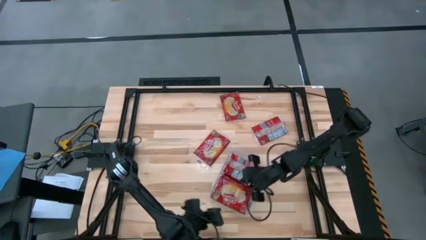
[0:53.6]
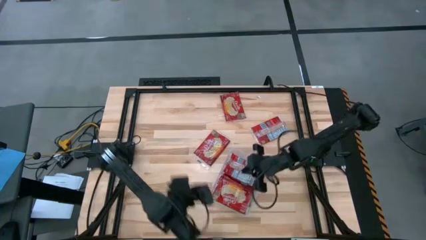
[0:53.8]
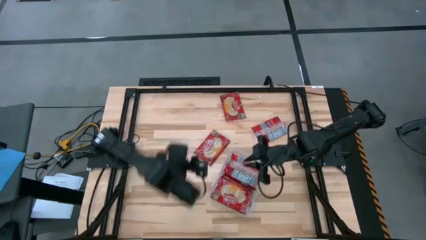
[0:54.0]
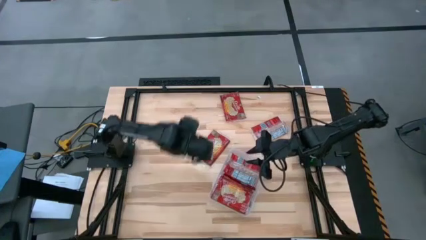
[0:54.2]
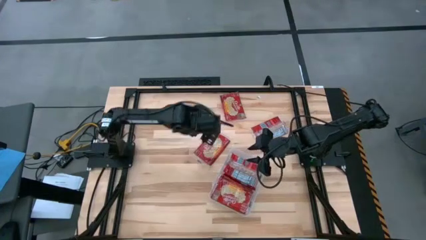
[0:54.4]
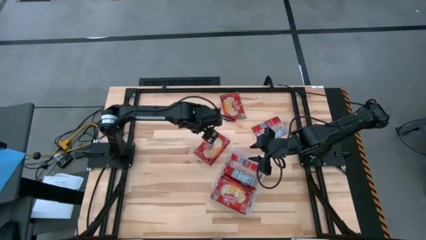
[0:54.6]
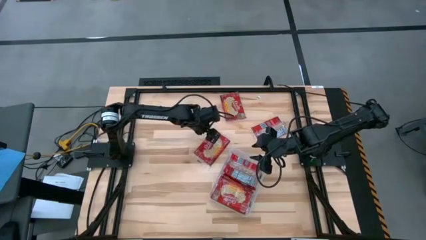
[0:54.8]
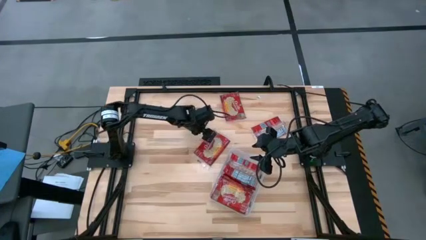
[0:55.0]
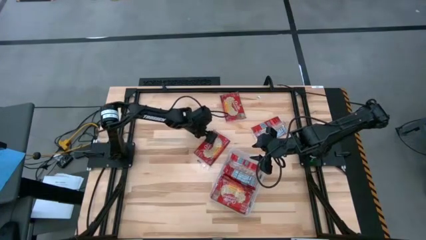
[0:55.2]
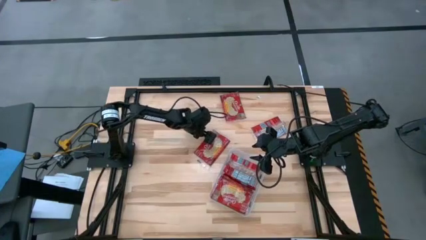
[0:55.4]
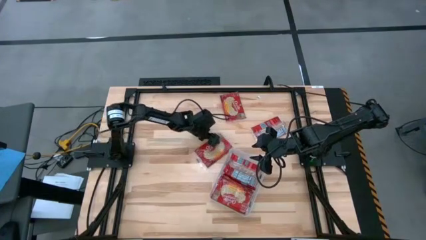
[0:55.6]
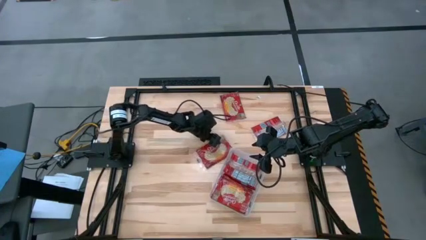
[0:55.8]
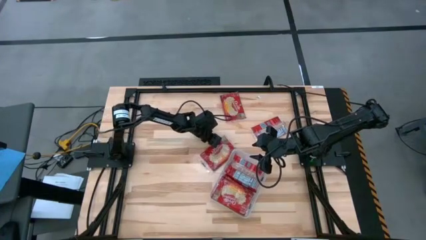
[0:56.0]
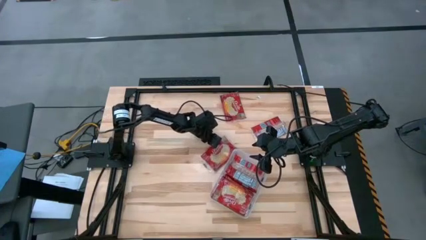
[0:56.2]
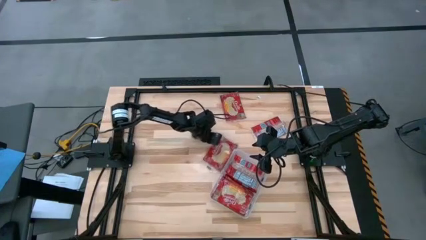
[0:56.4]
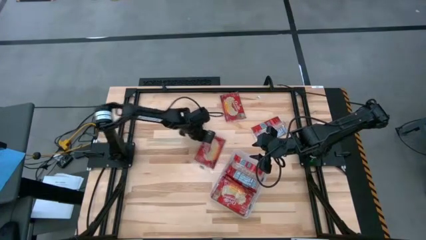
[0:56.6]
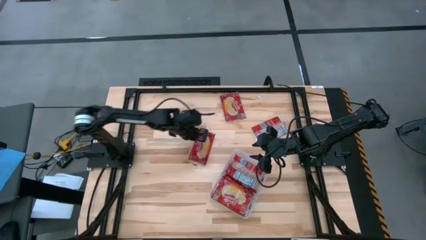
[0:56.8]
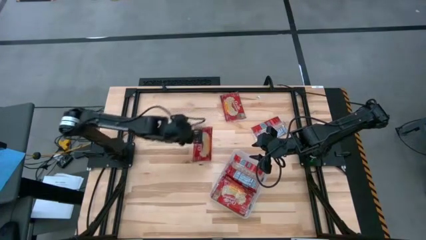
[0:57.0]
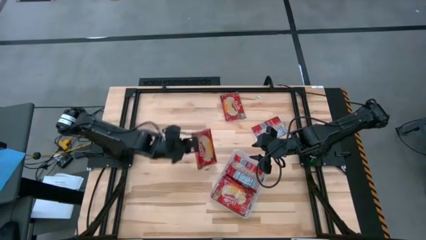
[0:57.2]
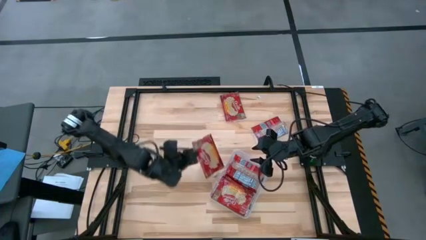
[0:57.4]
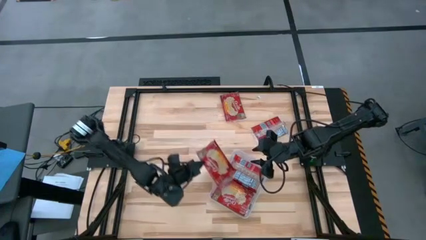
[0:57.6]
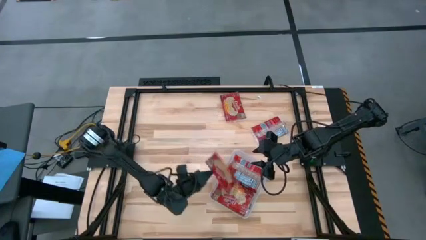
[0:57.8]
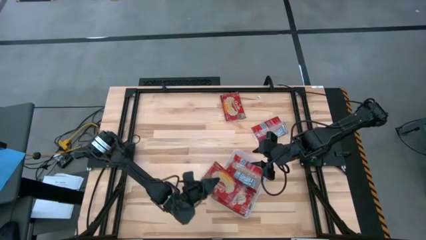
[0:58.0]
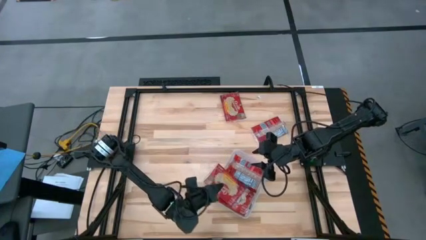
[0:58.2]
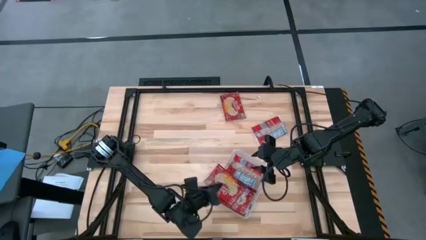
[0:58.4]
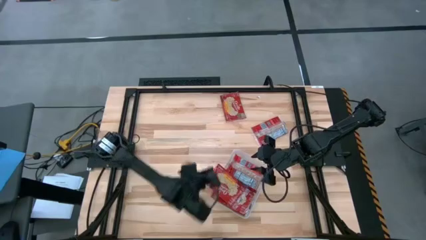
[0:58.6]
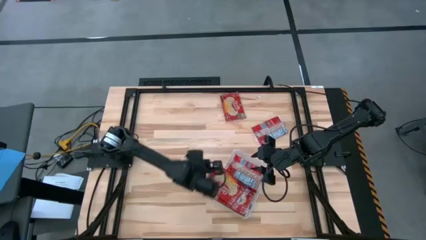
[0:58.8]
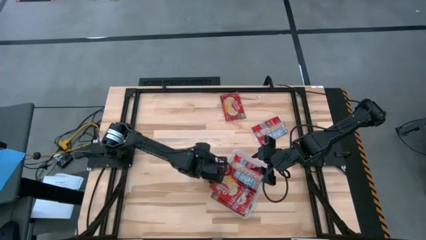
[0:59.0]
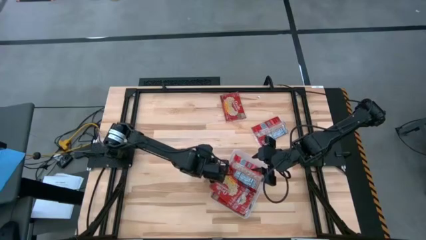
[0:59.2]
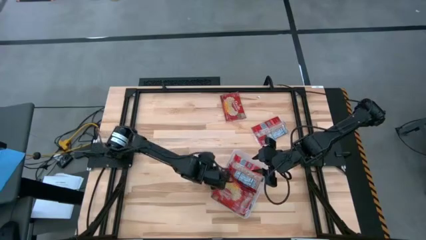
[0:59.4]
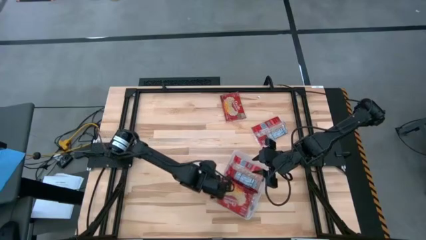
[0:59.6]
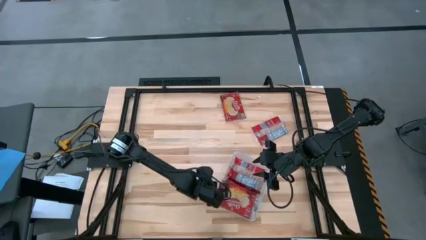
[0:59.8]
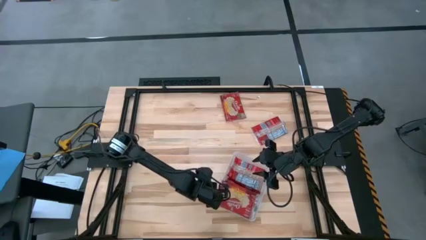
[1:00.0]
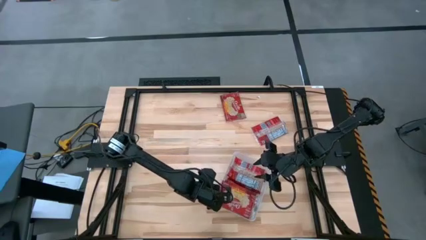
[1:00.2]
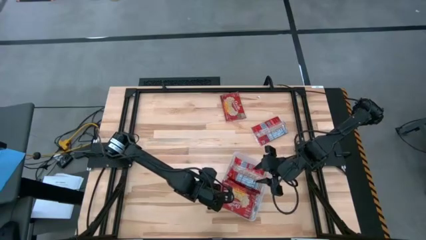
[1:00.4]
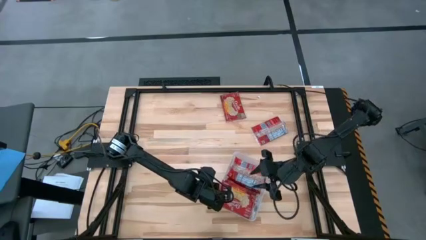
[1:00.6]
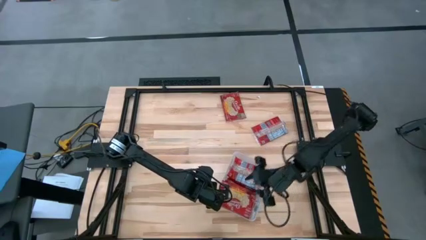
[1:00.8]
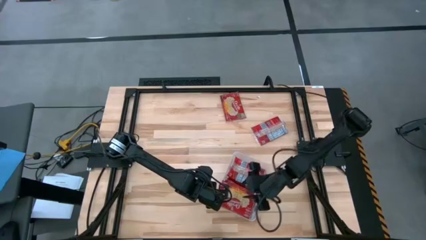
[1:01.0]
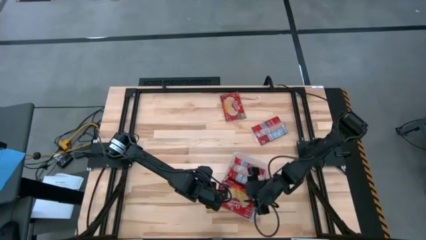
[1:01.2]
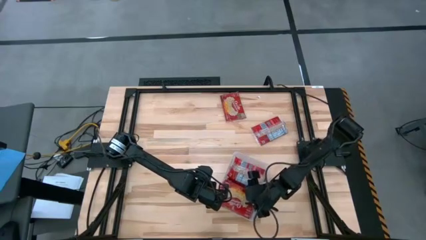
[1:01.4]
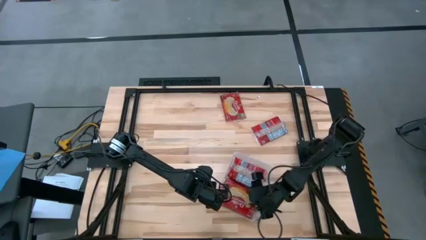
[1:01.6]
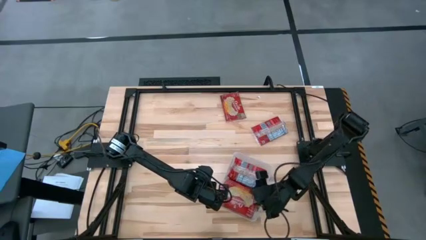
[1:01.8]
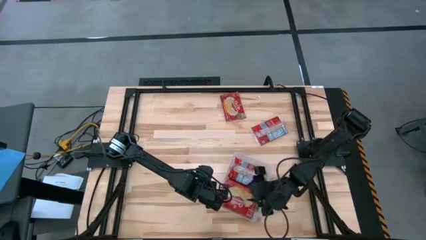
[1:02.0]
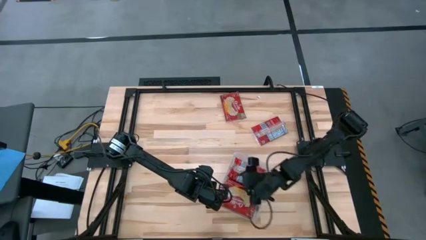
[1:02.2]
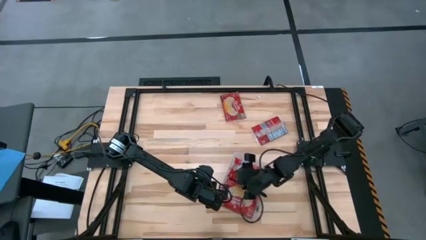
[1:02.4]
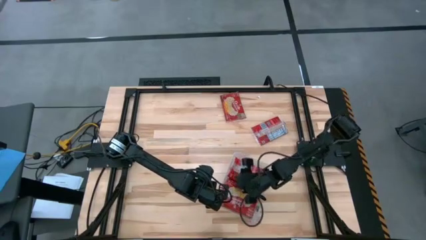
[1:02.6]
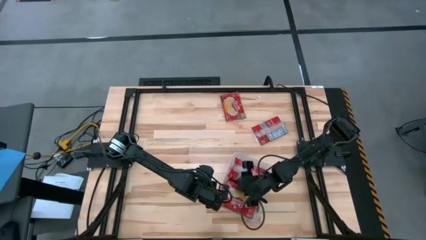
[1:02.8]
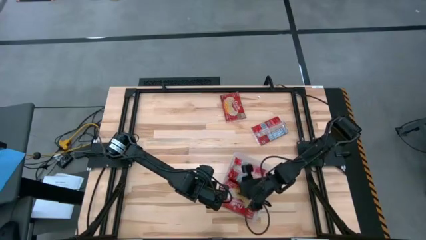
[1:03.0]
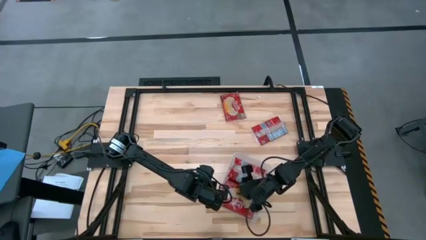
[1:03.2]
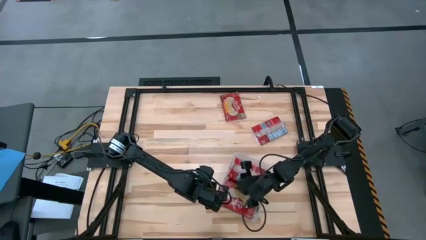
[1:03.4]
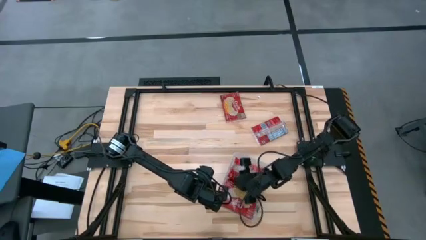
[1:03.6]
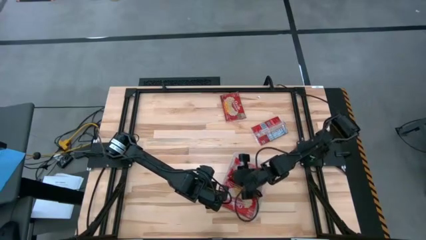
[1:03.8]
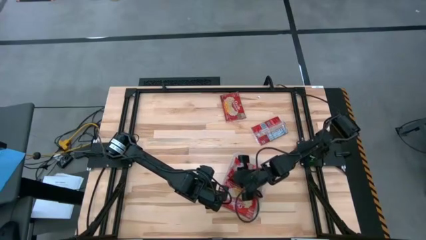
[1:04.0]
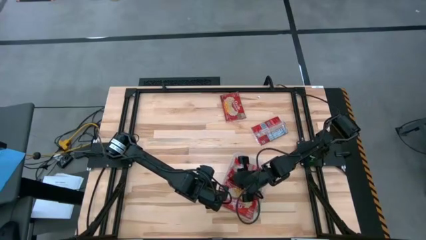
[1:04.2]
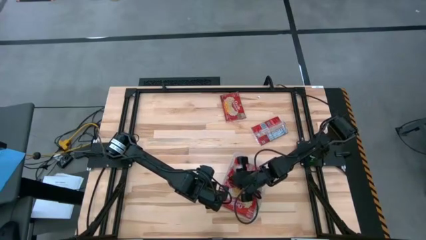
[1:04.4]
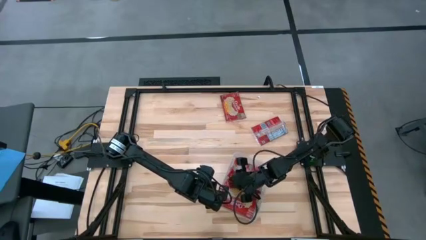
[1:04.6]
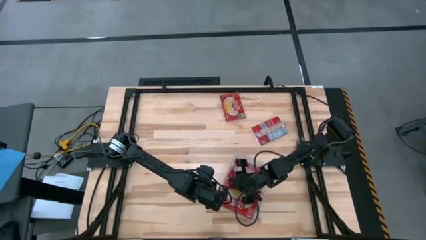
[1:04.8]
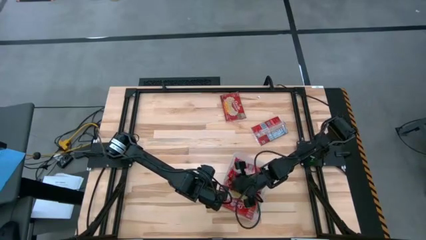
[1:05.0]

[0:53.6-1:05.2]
Task: Sort popcorn bags into baskets
Put the red popcorn bag into the transparent bin

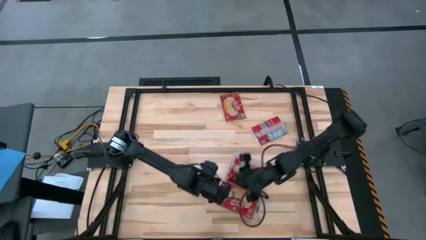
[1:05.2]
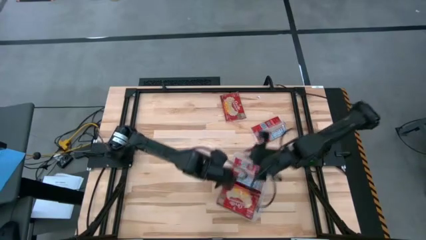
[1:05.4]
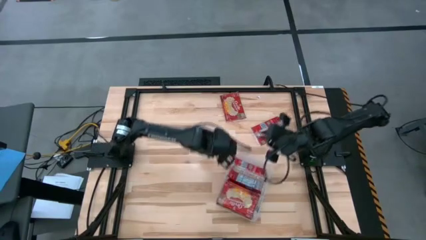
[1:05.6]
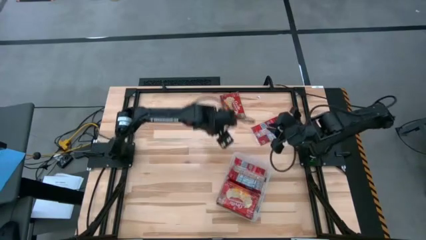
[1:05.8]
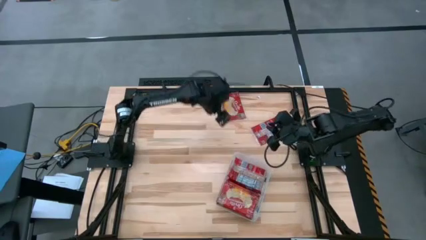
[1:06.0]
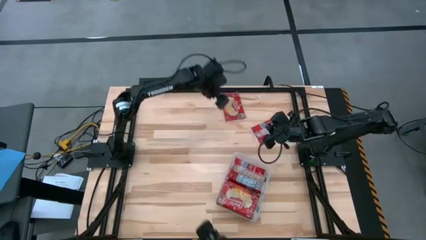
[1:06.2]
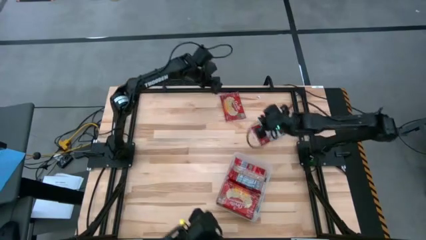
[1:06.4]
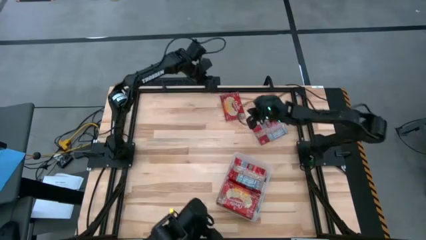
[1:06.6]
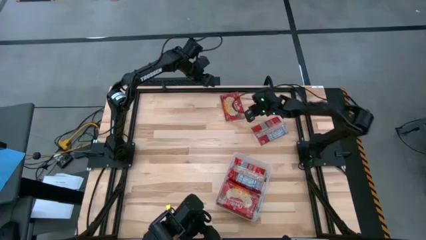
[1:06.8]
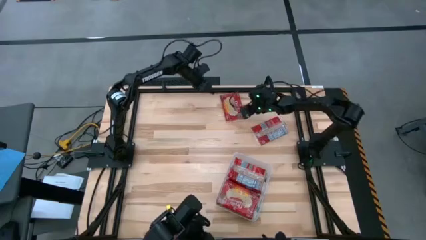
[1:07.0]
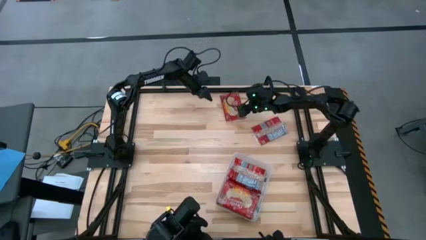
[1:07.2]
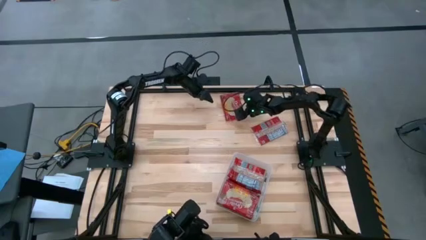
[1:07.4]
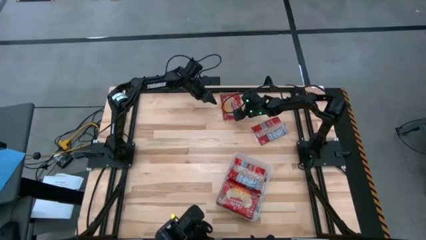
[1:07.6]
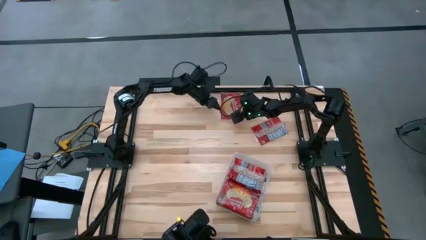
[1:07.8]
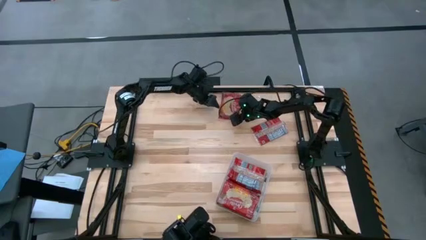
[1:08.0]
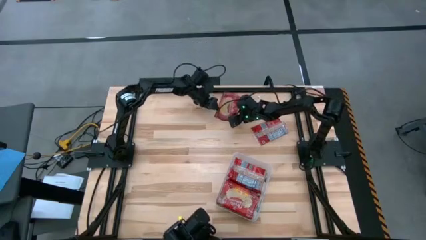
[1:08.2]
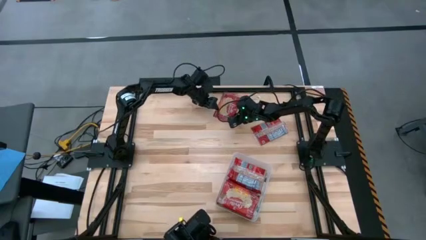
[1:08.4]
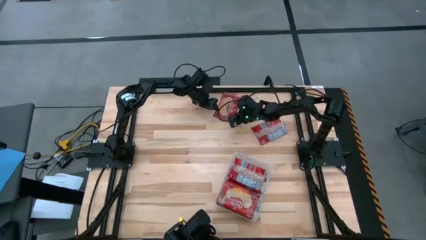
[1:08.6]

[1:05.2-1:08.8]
Put the red popcorn bag into the transparent bin
